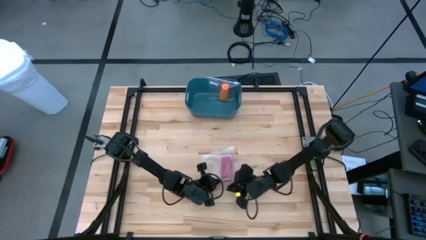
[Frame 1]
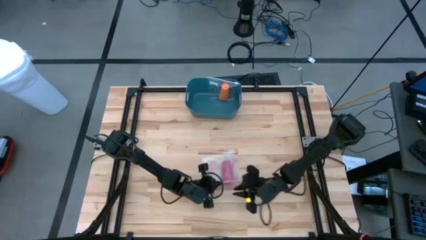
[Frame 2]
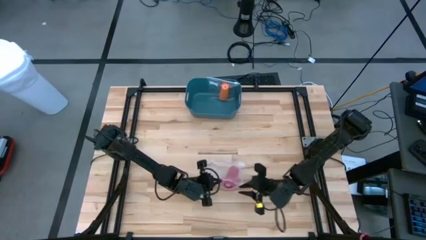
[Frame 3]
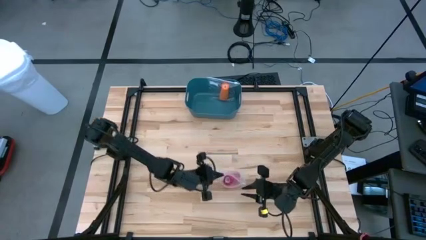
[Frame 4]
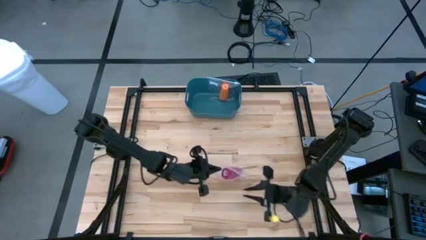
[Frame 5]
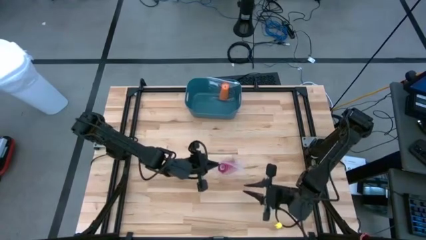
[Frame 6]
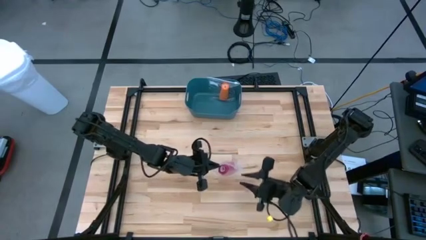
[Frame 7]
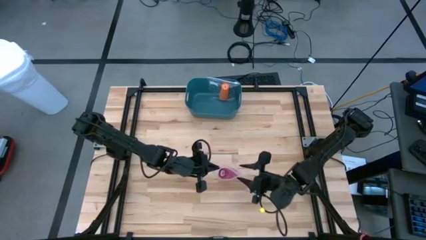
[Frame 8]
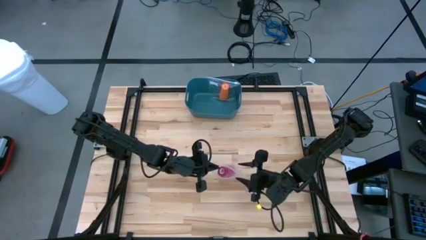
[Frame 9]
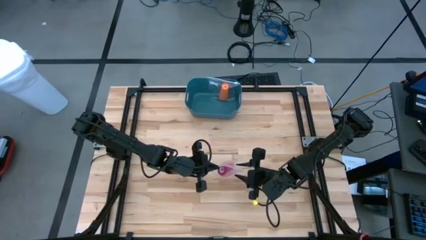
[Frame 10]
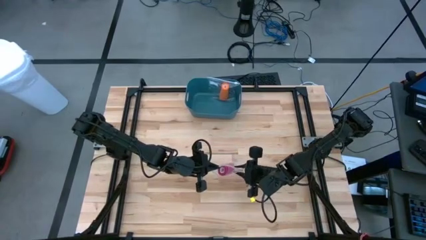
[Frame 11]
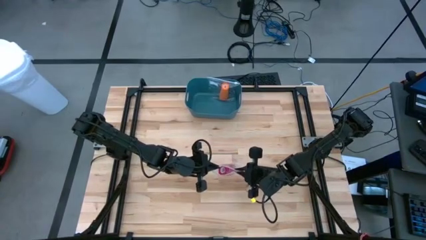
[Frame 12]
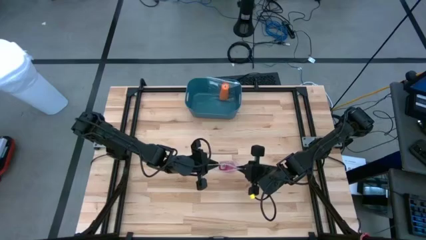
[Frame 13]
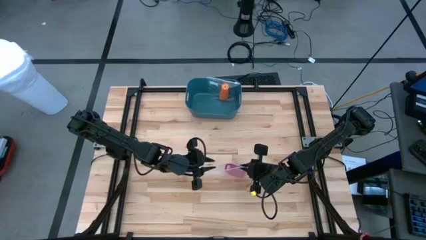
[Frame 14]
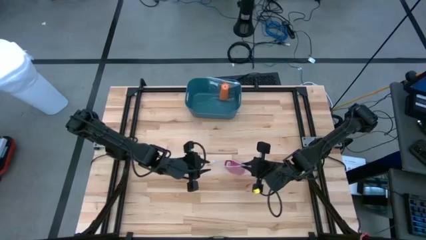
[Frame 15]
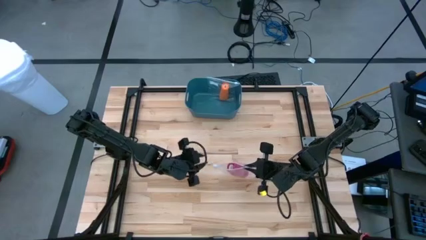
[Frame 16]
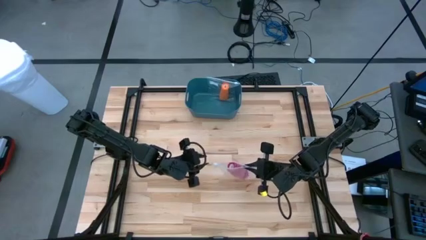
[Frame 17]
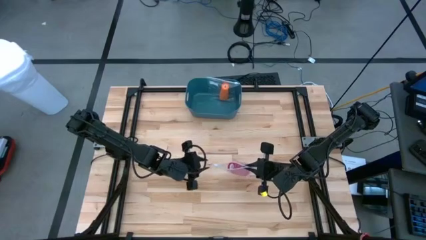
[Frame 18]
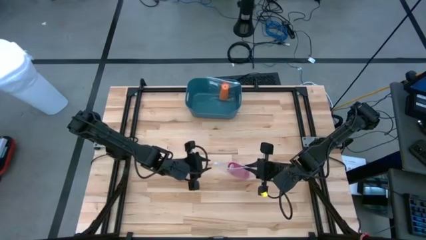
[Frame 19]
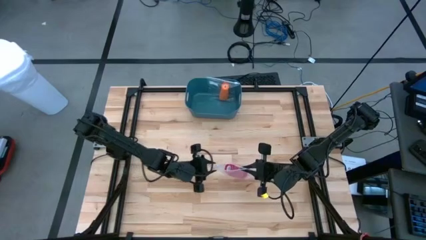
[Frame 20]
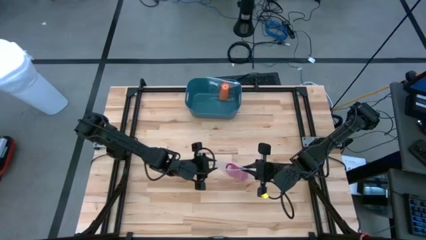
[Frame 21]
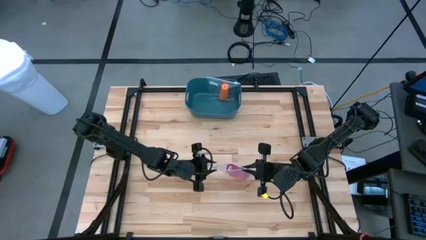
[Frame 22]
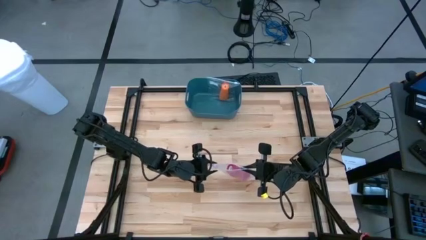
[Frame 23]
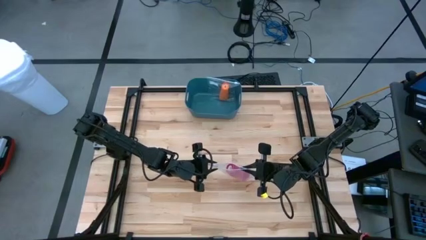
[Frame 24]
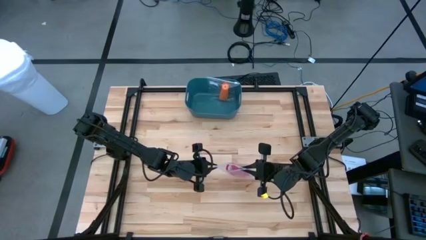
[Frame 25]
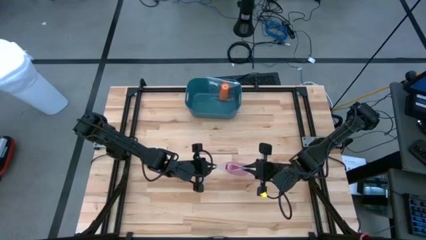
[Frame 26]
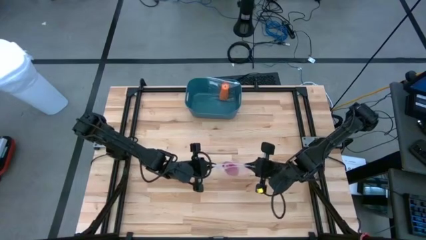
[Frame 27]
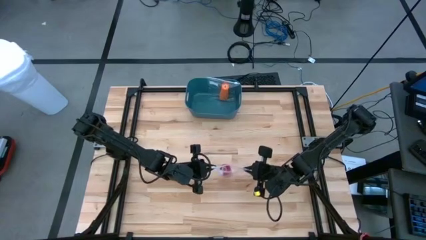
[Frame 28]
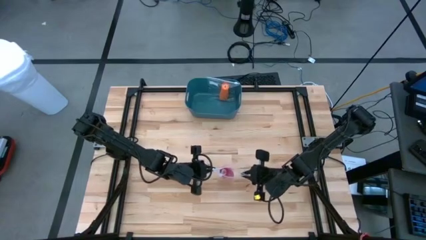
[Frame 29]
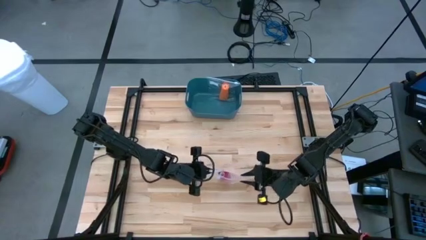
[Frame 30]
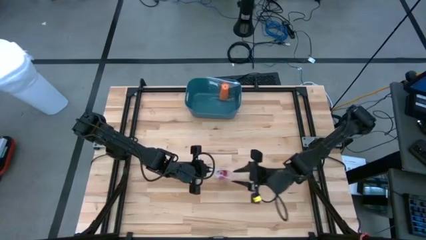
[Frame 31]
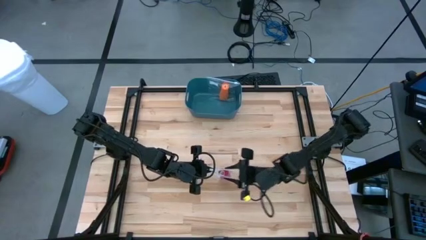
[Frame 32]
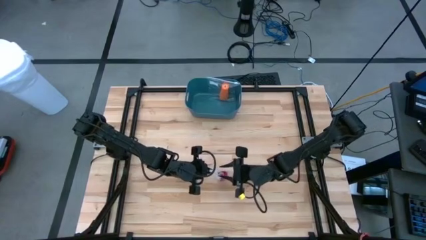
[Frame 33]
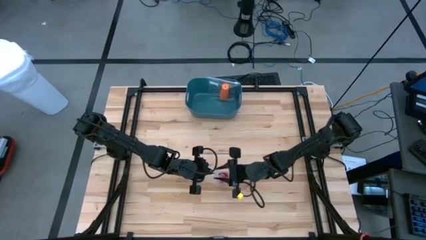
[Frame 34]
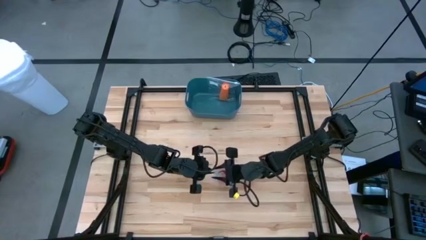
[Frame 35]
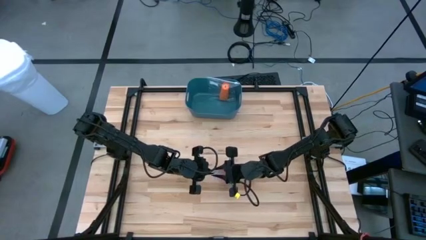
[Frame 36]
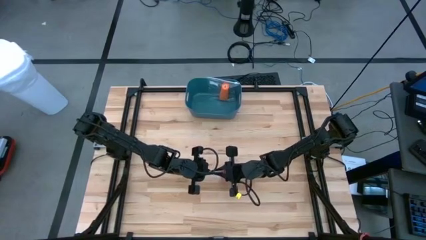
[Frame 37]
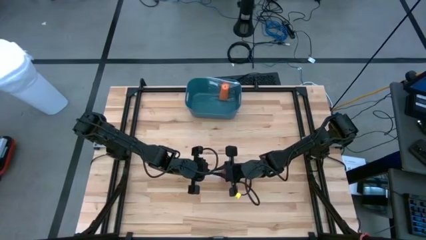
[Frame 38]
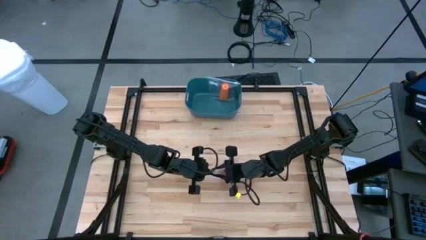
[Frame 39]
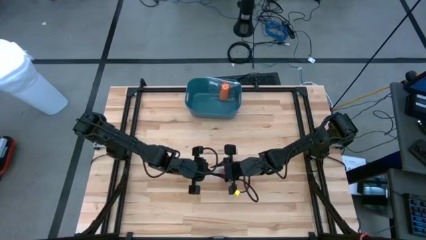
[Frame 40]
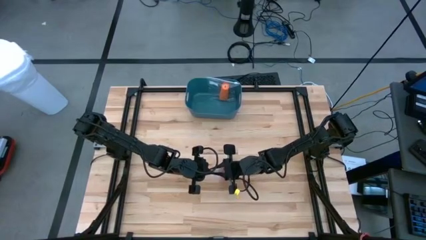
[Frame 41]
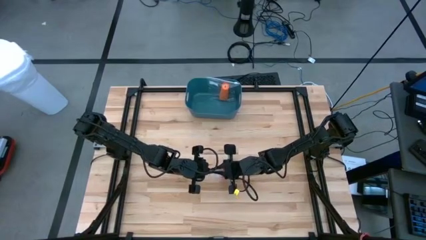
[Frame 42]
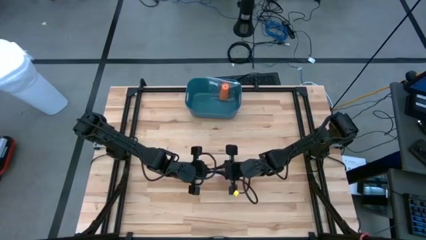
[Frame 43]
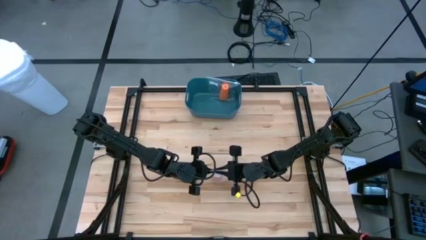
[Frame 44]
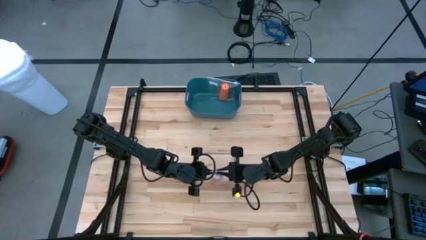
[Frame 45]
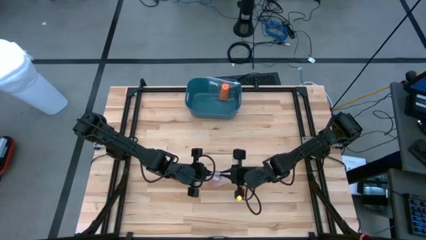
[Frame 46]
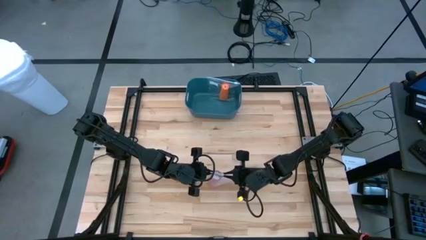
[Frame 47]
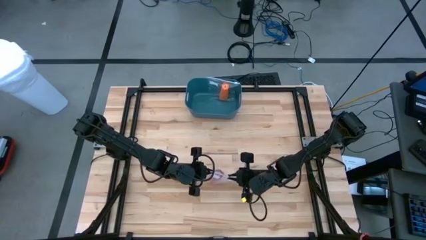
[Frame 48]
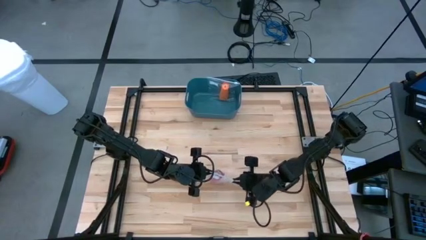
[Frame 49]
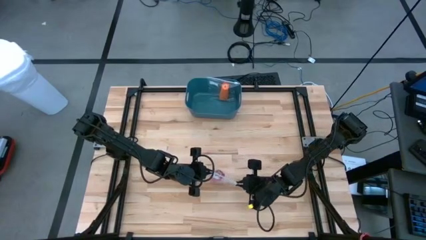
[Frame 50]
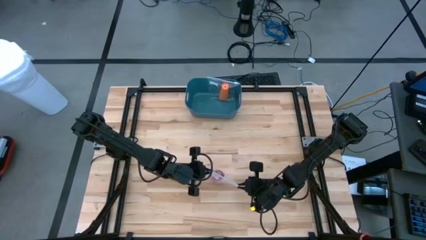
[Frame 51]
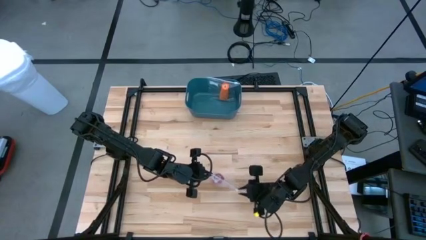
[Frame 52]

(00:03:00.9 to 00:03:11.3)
Task: Roll bandage
Close the transparent zip lock containing the rolled pink bandage

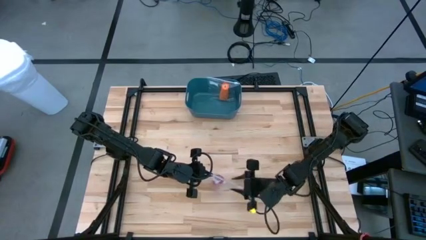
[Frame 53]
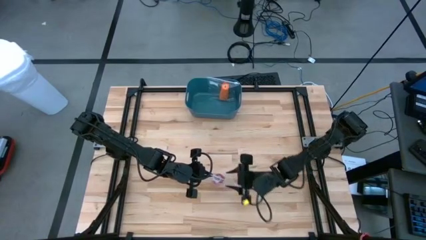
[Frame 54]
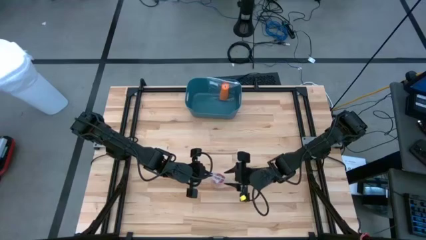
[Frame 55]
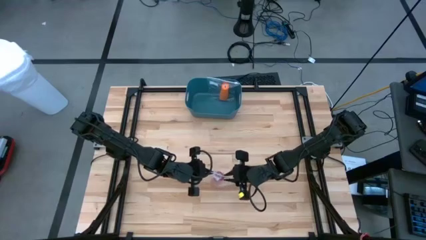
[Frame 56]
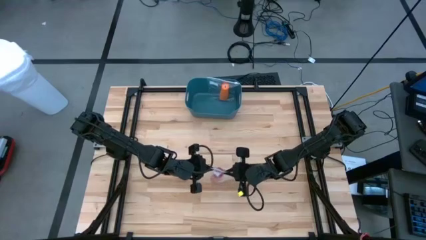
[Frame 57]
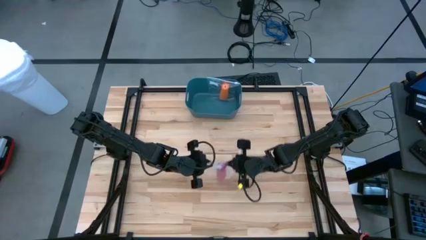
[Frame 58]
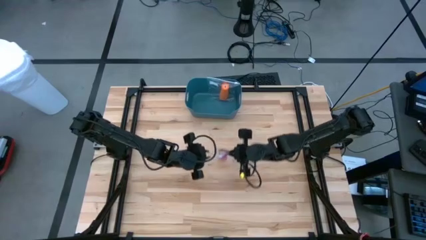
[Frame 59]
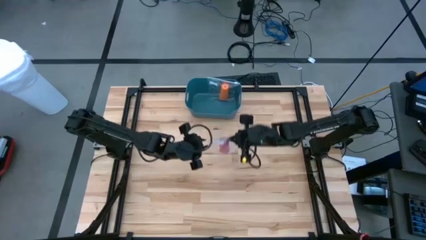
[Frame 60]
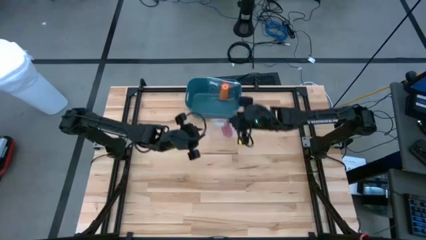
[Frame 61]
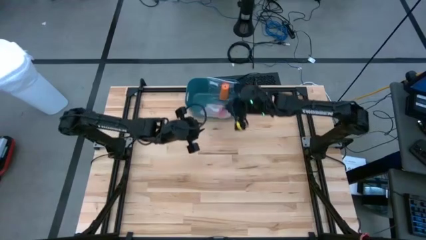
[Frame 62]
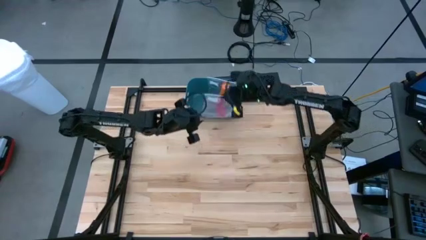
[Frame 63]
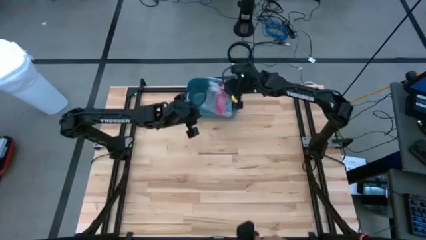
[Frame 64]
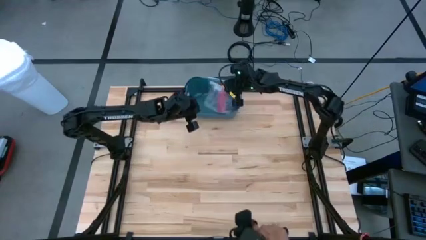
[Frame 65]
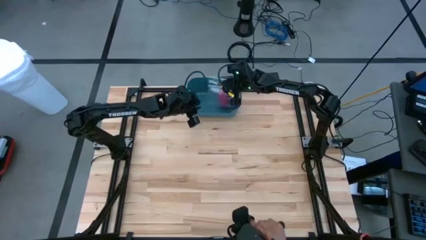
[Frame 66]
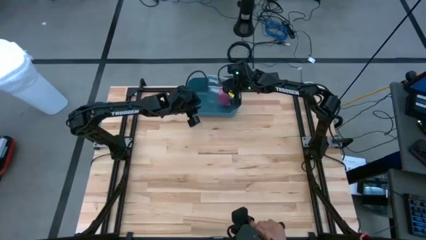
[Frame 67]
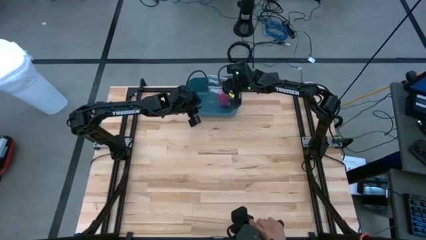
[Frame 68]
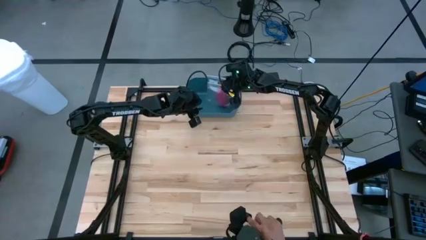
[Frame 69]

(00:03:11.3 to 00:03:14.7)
Put the transparent zip lock containing the rolled pink bandage into the blue bin

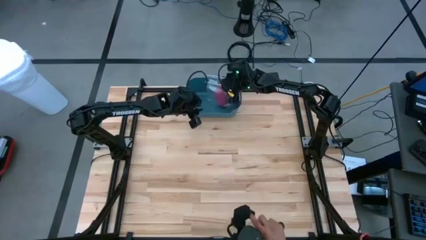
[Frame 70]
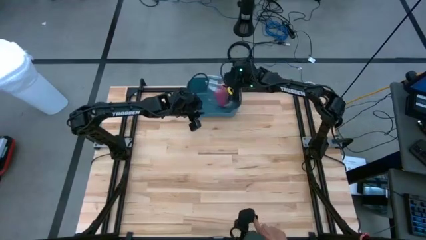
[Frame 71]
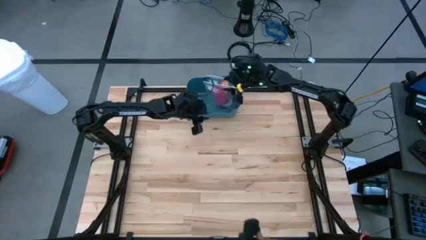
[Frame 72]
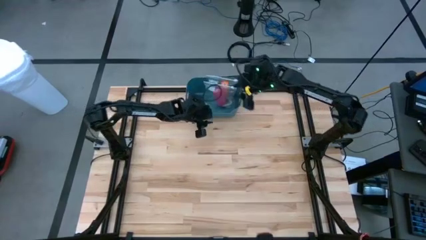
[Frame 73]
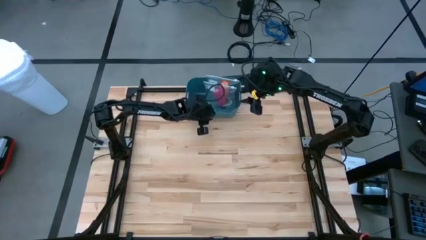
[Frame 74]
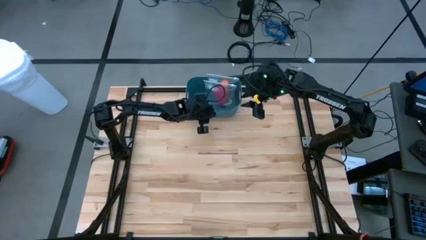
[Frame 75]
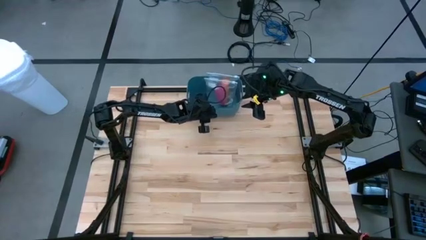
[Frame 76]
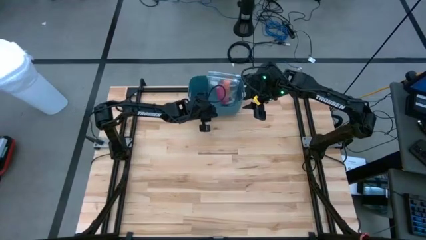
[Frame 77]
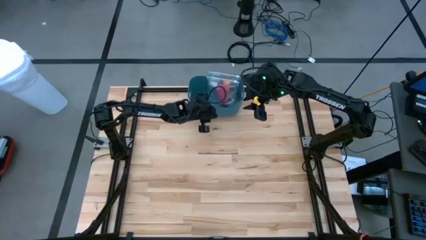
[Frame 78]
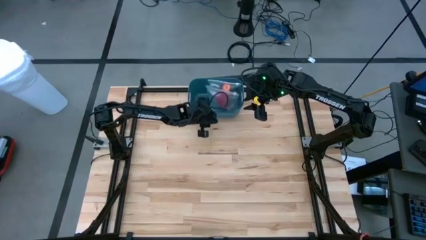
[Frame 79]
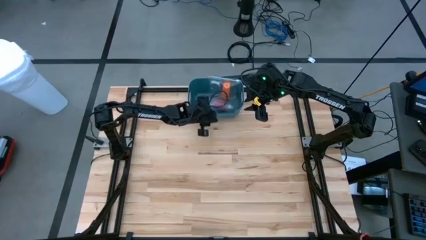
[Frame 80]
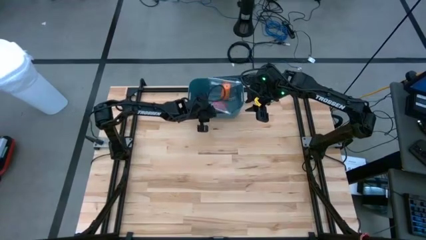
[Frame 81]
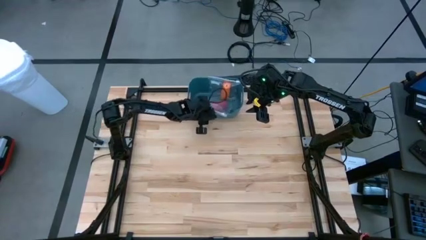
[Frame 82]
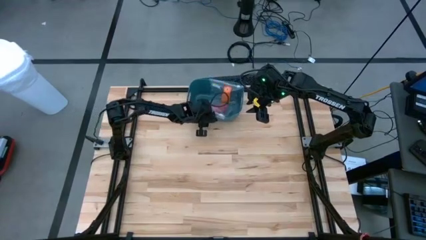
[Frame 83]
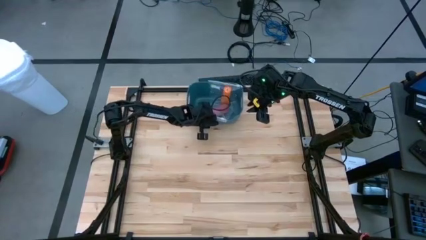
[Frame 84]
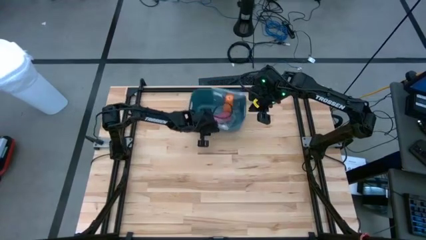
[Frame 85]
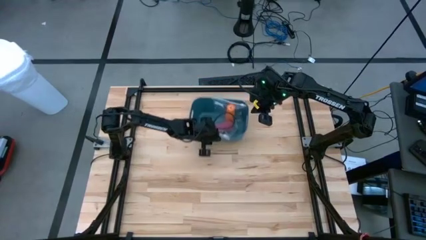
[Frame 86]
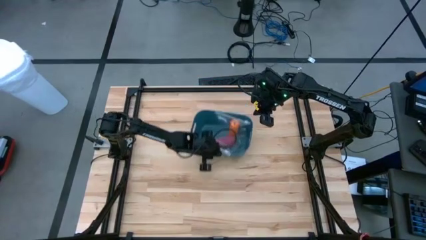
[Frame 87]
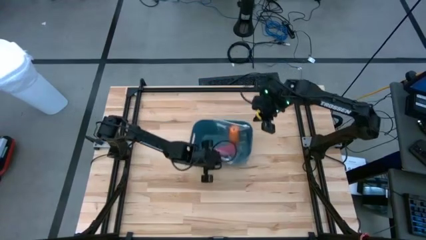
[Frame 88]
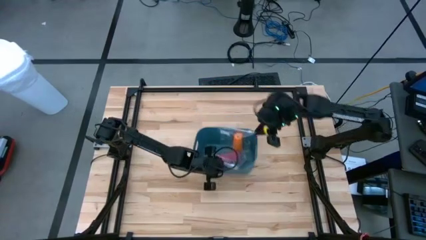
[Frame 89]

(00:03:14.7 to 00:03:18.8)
Move the blue bin to the center of the table
